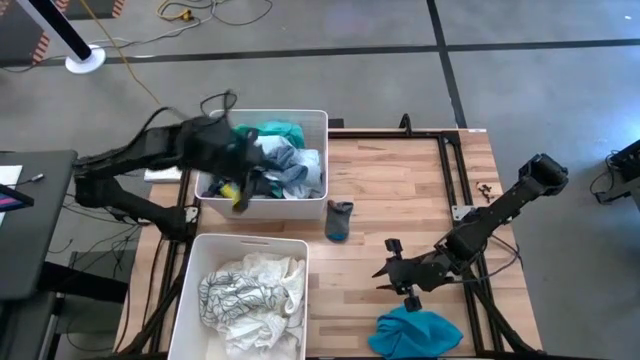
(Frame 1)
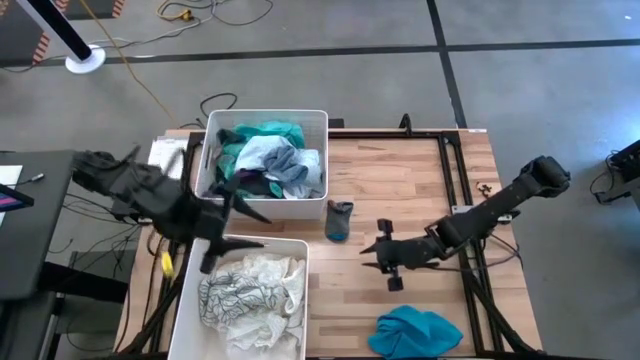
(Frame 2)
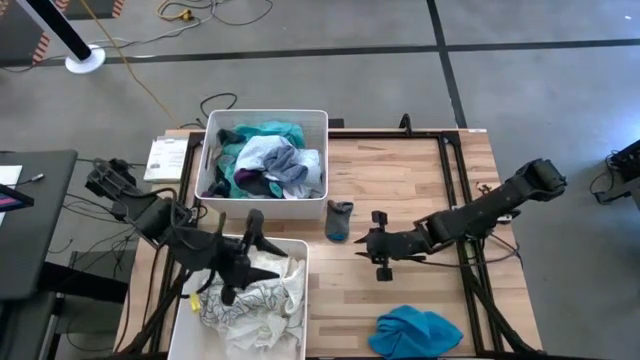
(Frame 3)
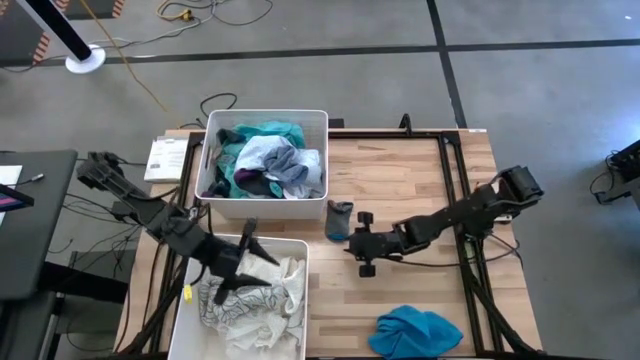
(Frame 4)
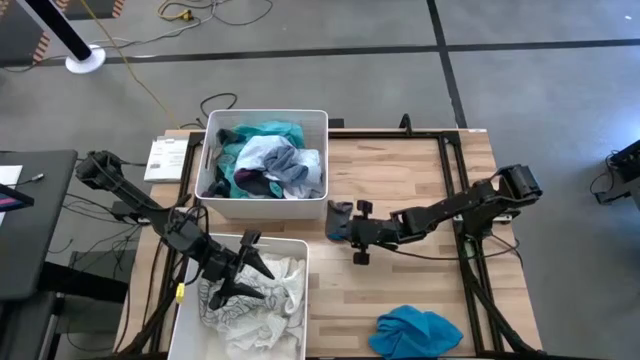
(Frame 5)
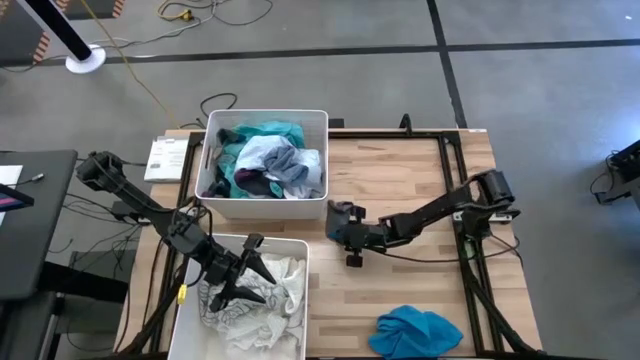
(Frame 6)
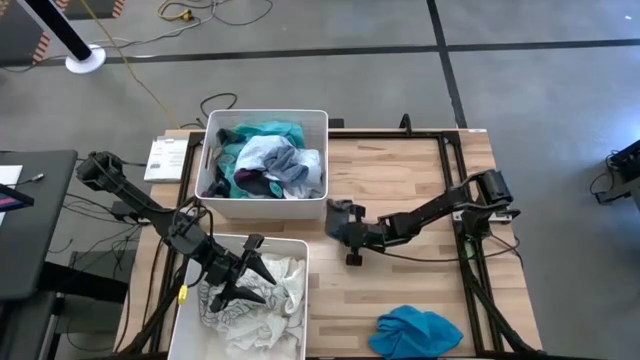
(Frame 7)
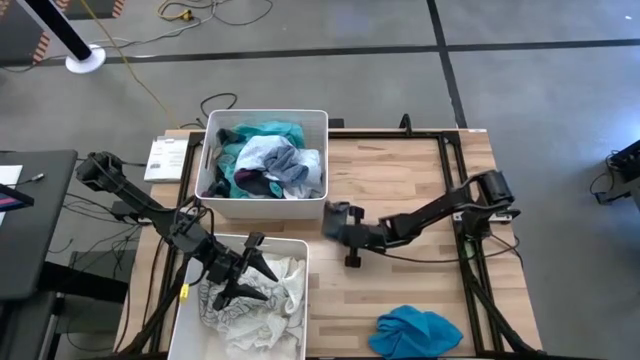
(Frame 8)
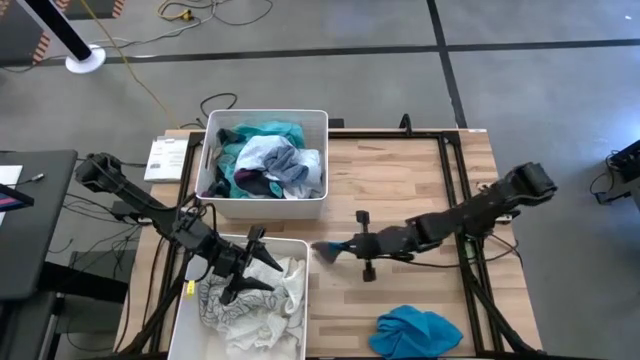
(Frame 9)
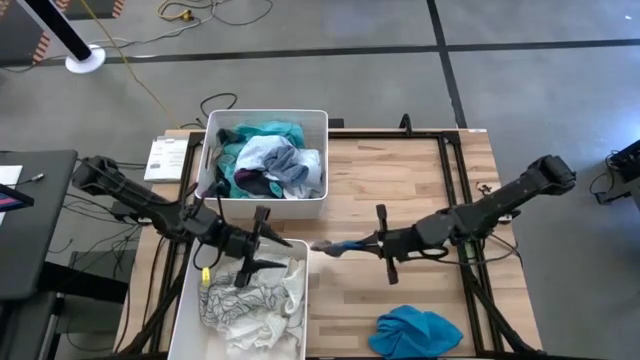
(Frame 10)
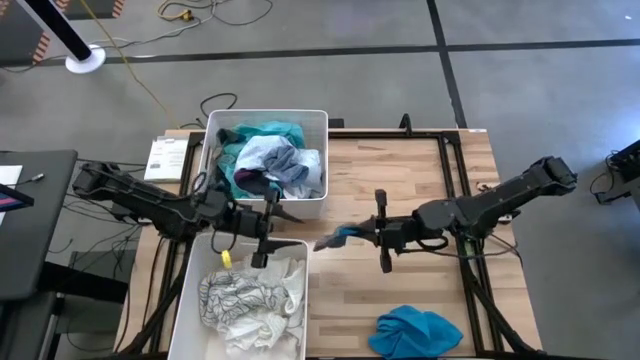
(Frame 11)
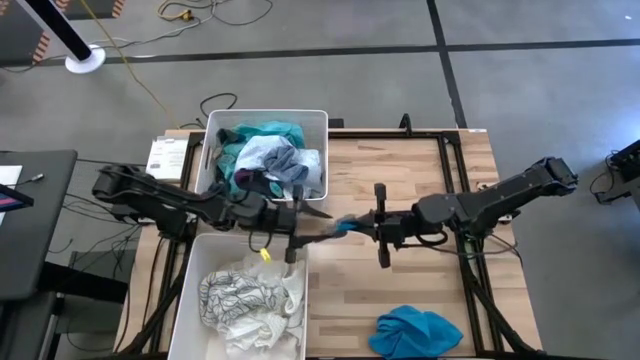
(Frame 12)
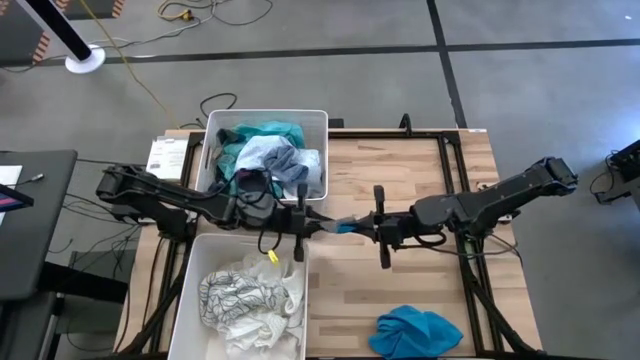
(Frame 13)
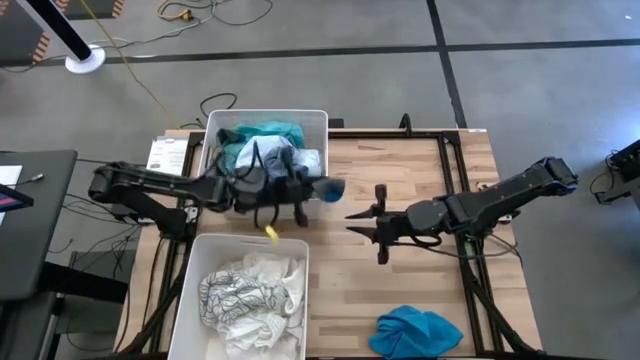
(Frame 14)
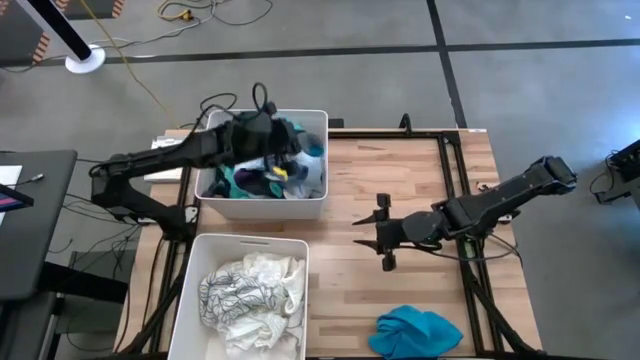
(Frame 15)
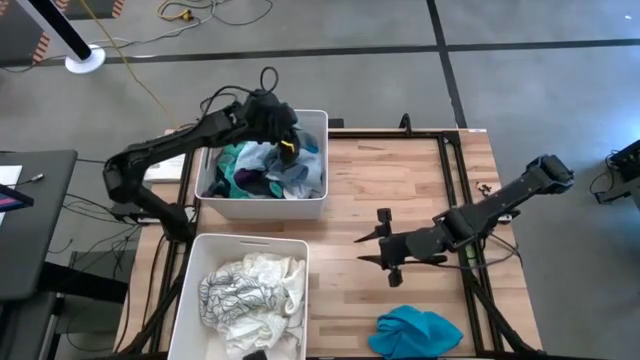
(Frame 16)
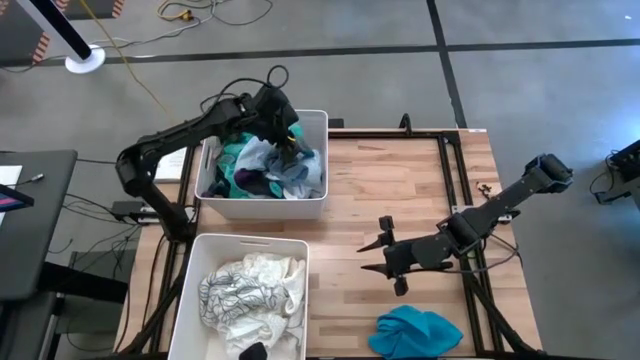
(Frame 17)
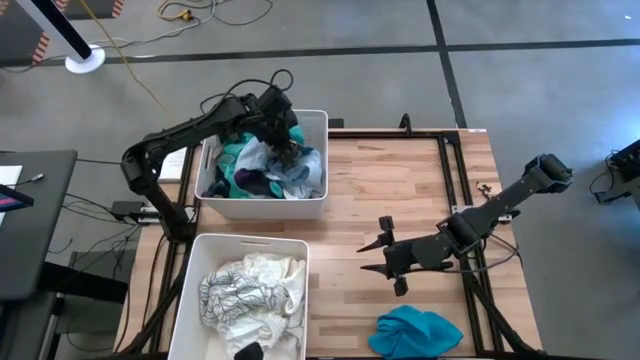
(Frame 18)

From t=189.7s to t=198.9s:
Task: Sort clothes
Put the gray sock into the top white laundry bin

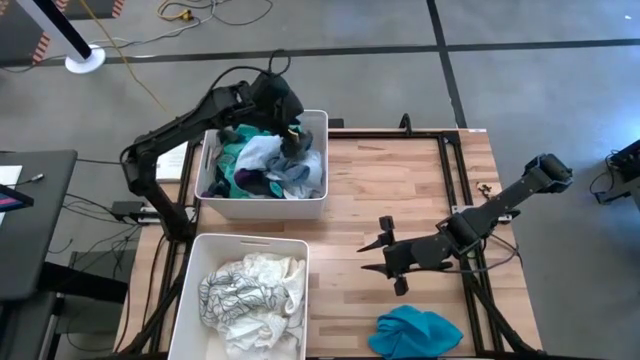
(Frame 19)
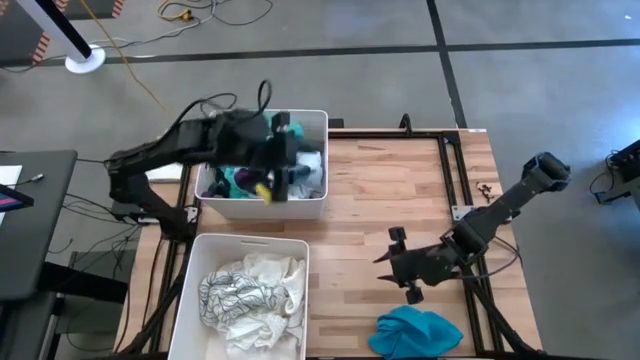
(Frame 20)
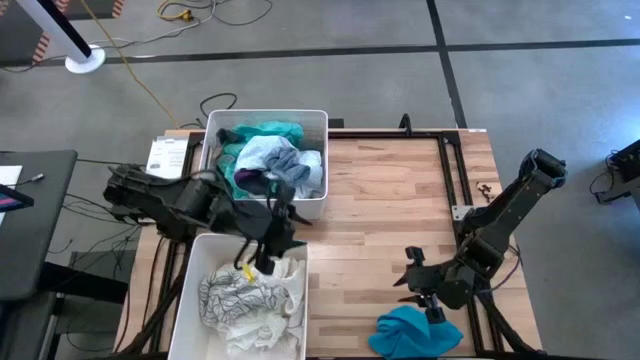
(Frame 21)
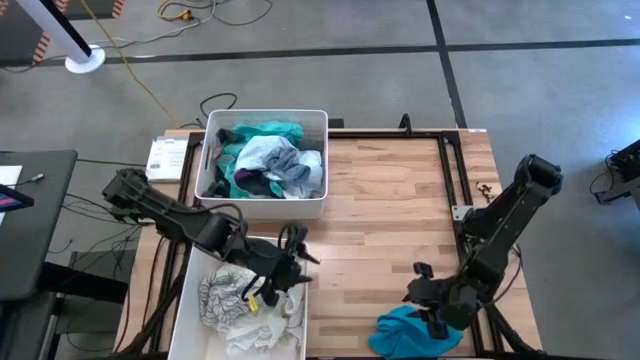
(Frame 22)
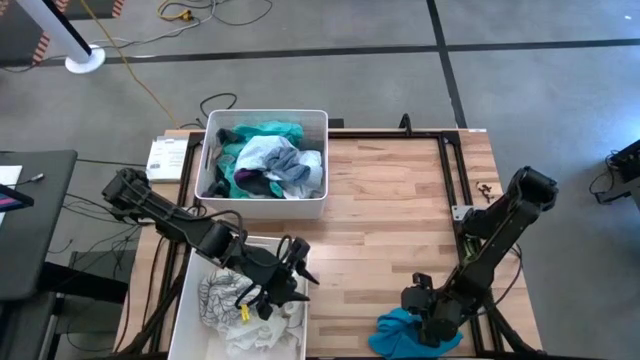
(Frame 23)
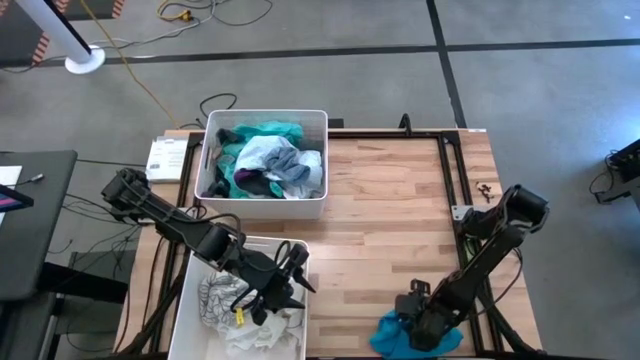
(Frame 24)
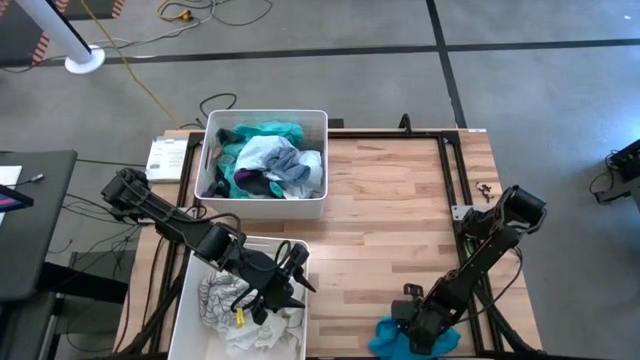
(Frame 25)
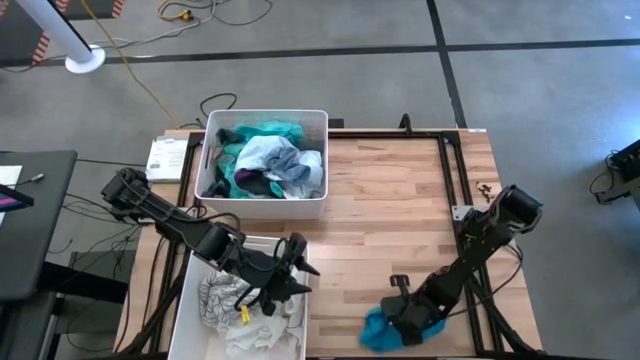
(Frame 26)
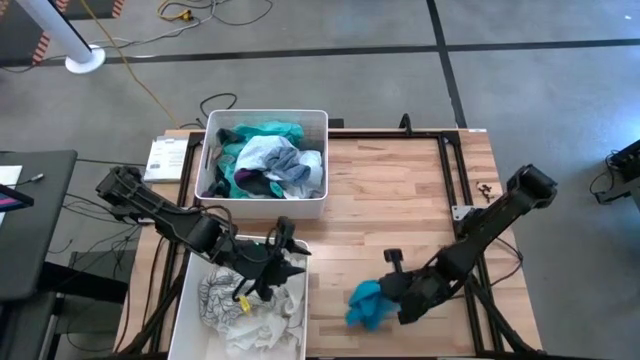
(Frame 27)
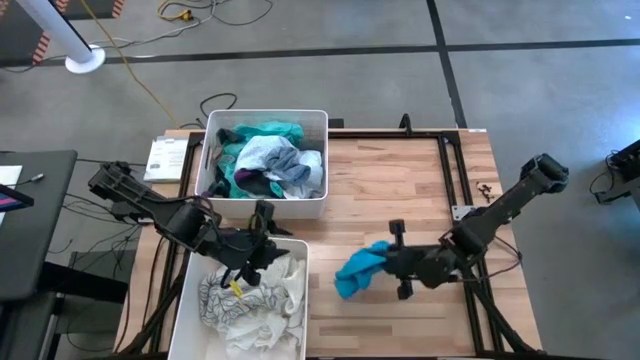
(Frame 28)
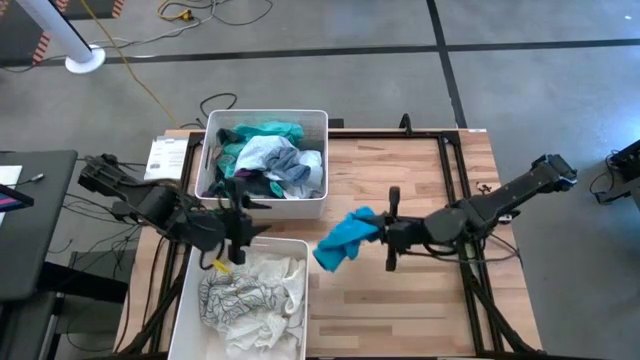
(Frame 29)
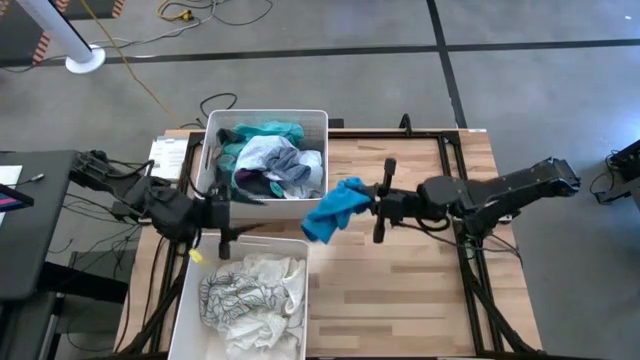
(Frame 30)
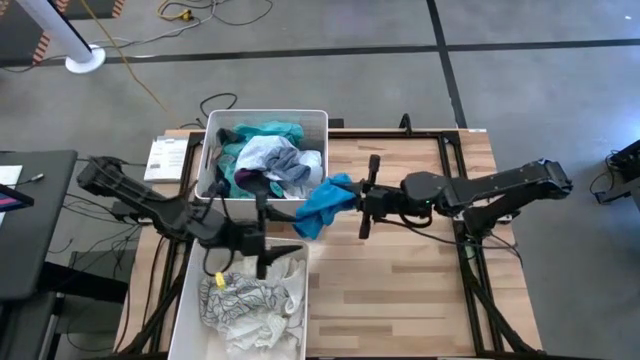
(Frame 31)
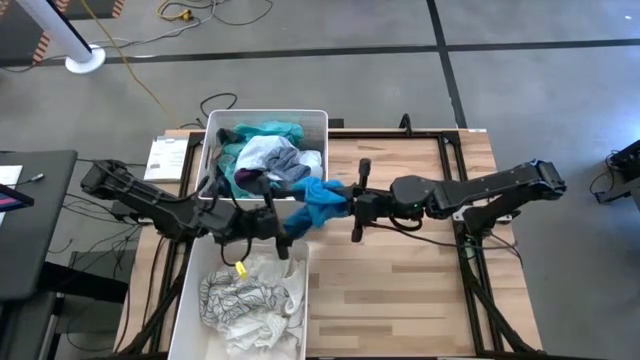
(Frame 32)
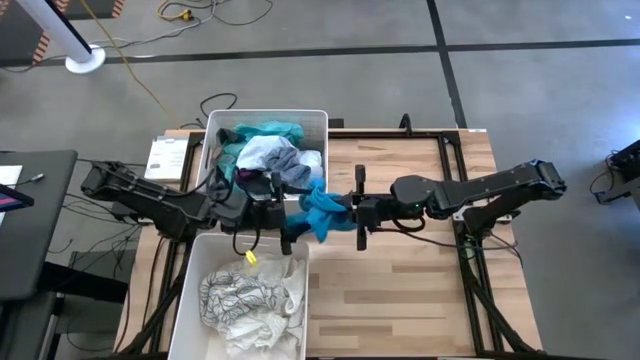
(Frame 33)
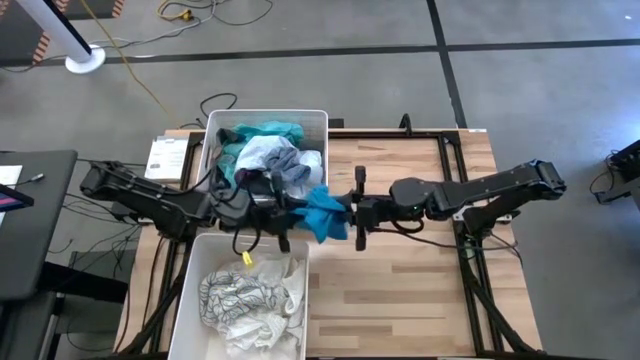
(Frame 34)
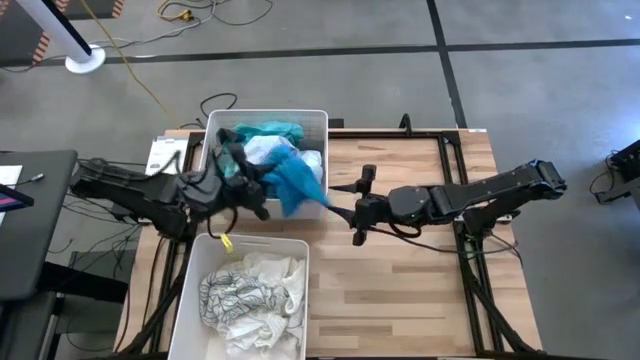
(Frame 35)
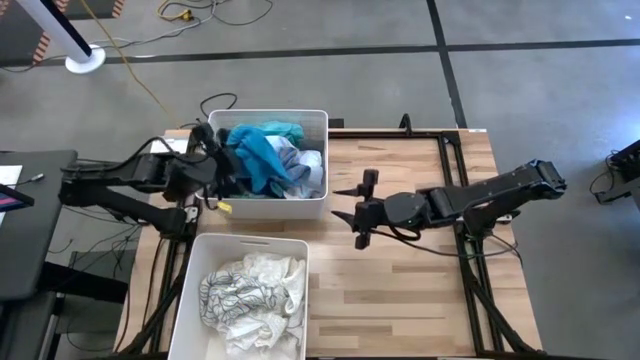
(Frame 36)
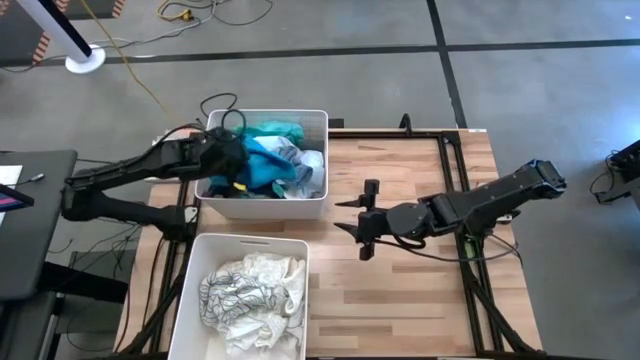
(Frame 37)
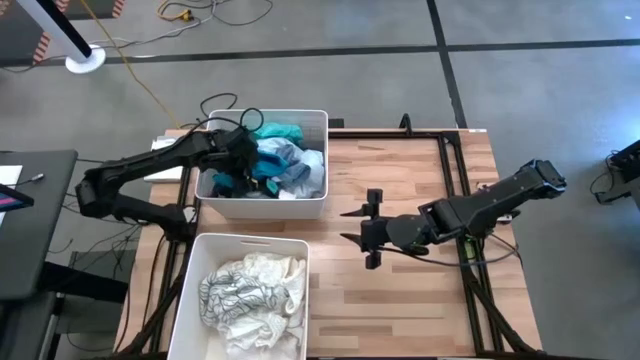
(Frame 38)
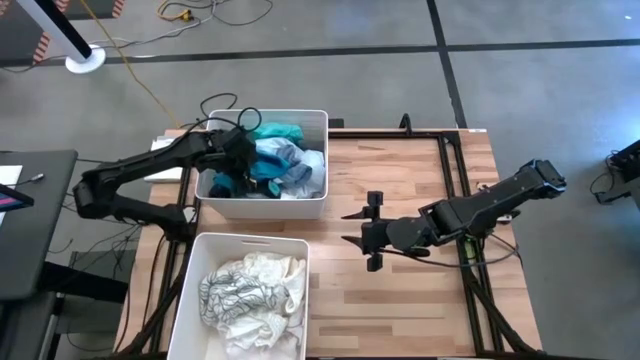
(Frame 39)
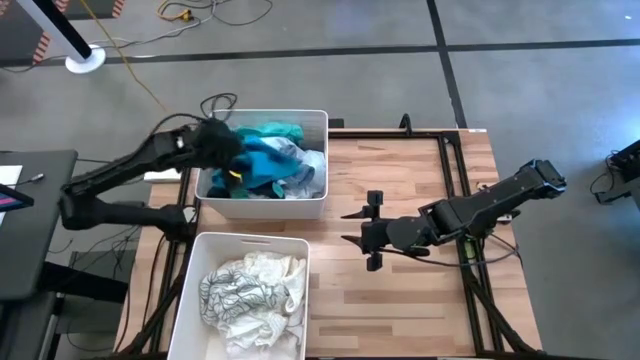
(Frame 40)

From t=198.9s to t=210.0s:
Put the blue shorts into the top laundry bin

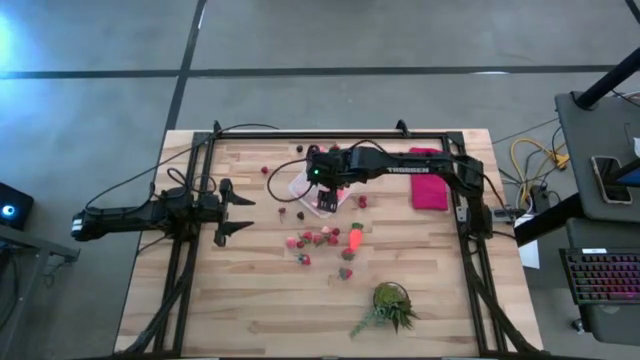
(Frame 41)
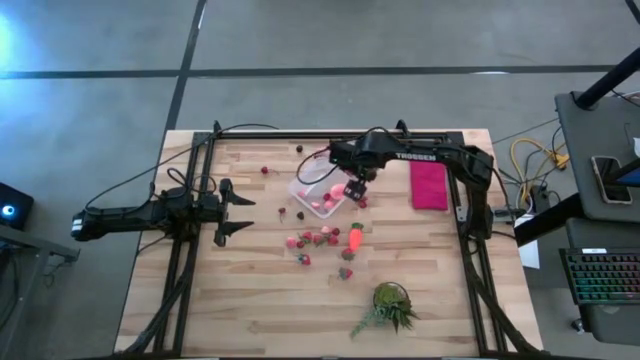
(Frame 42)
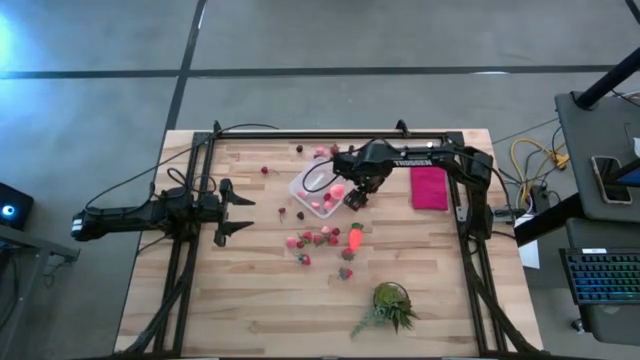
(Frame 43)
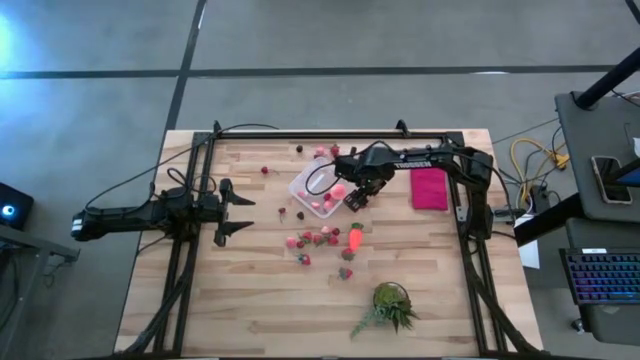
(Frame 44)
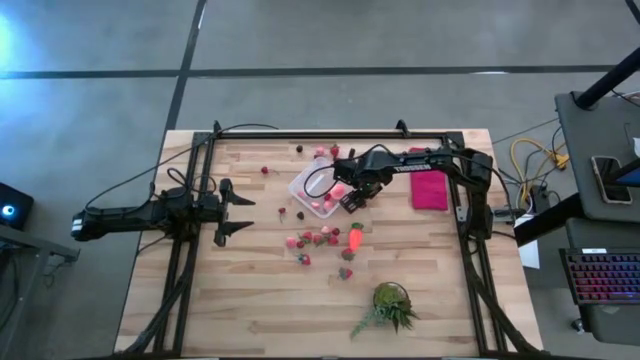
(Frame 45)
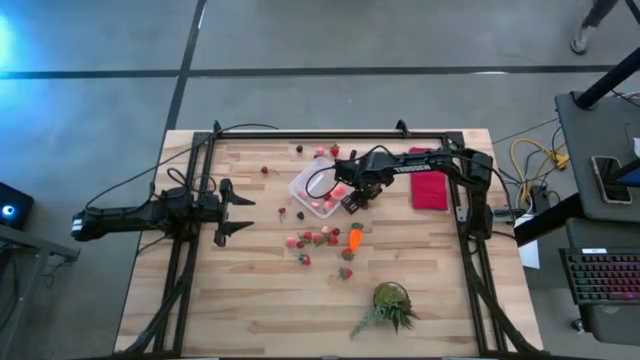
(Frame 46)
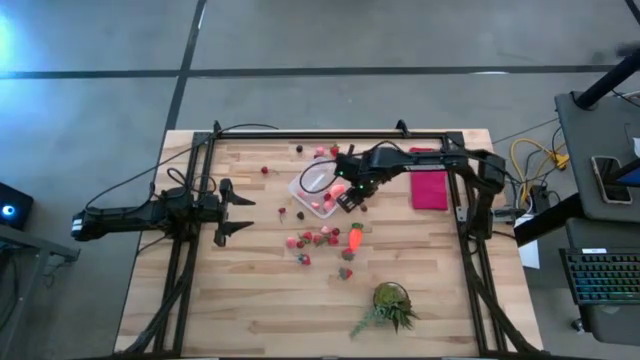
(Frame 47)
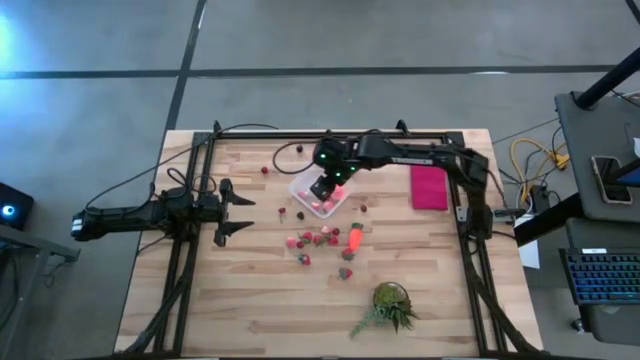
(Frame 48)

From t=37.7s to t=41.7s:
Task: Pick and placing Produce into tupperware
Put the red cherry into the transparent container
